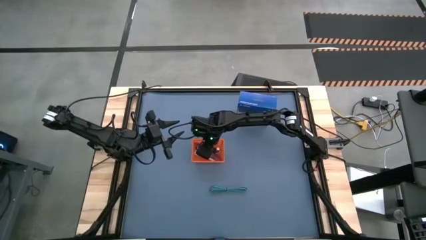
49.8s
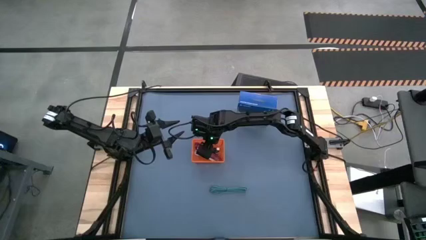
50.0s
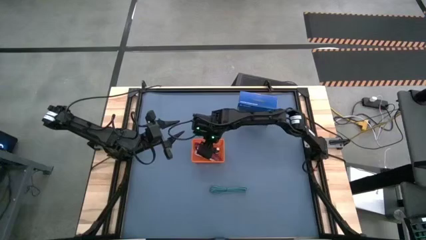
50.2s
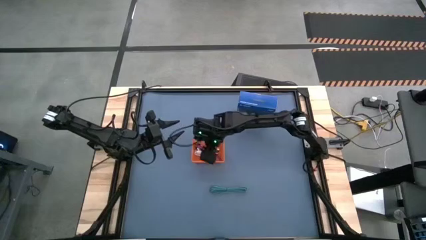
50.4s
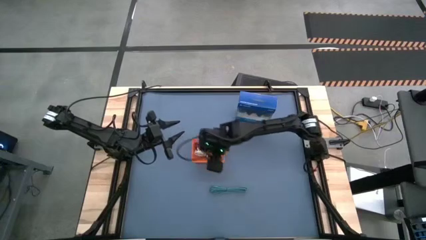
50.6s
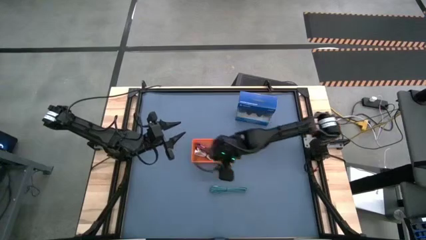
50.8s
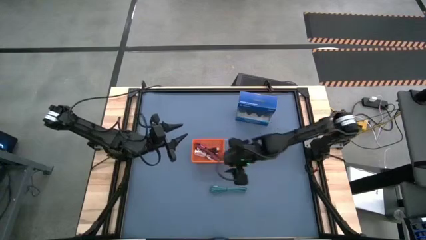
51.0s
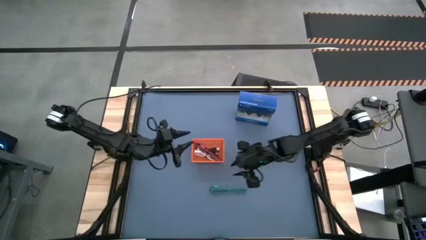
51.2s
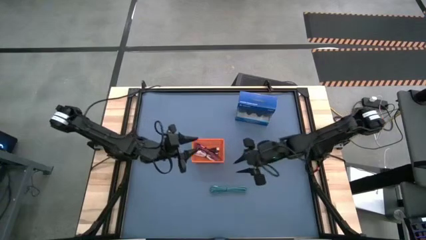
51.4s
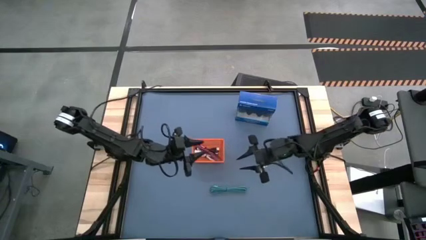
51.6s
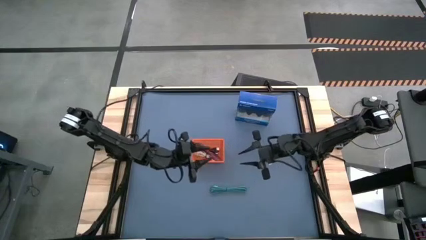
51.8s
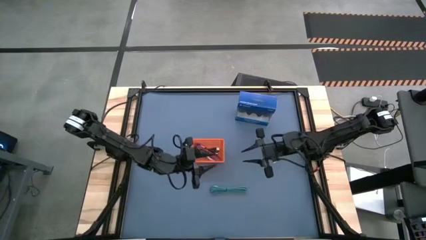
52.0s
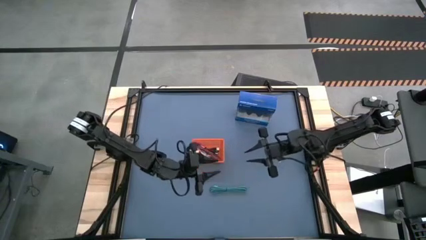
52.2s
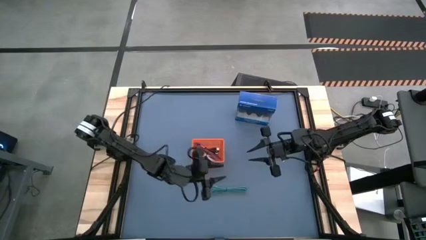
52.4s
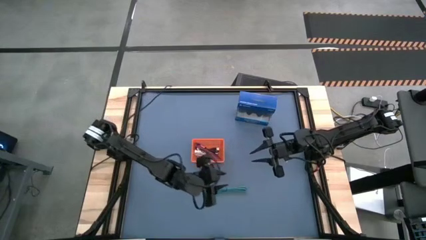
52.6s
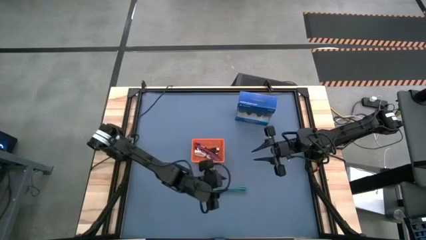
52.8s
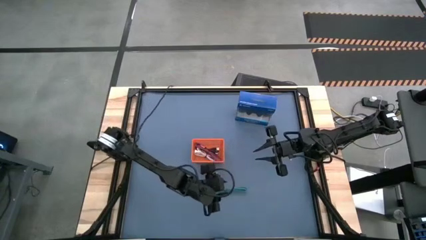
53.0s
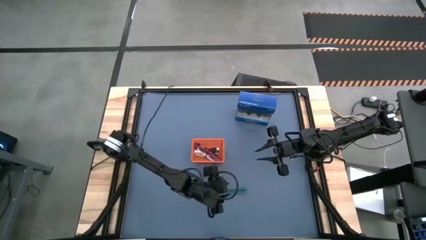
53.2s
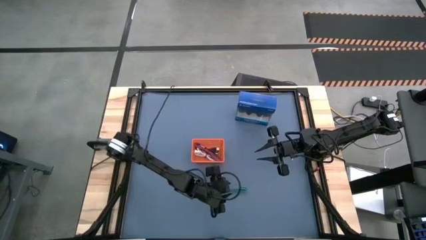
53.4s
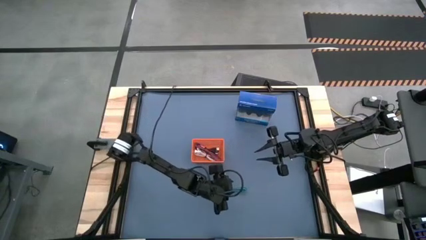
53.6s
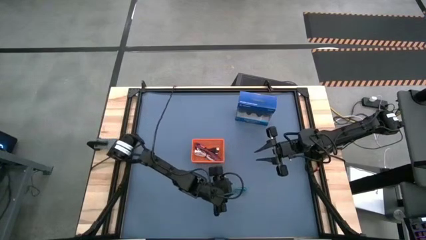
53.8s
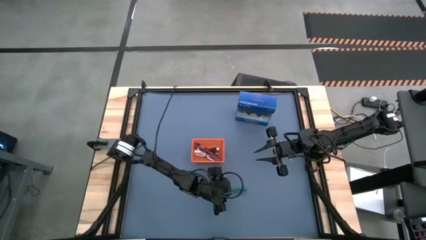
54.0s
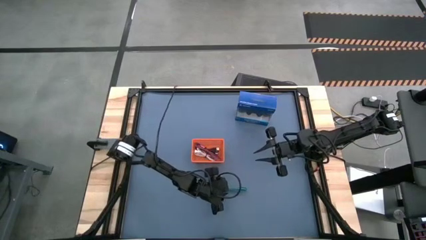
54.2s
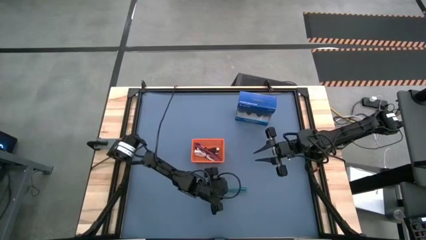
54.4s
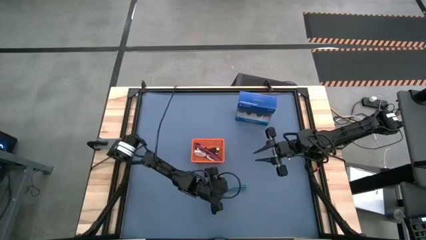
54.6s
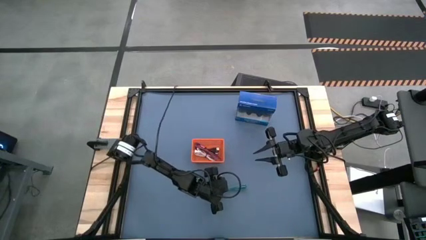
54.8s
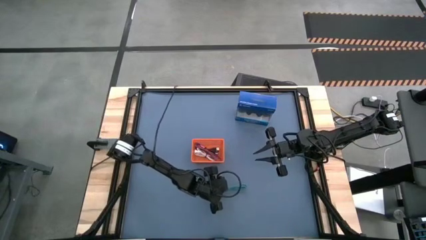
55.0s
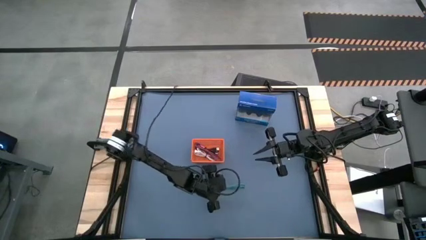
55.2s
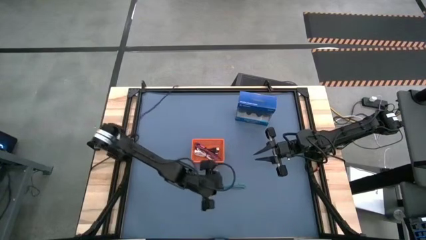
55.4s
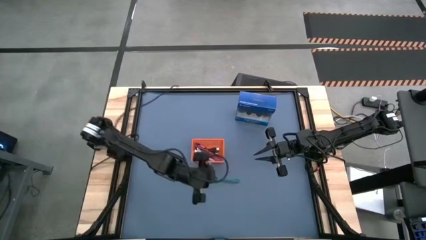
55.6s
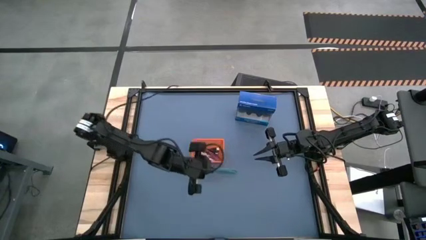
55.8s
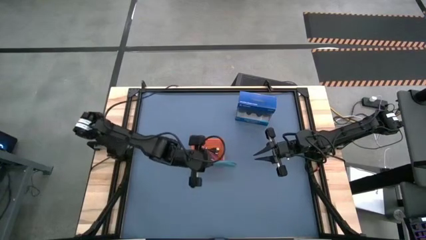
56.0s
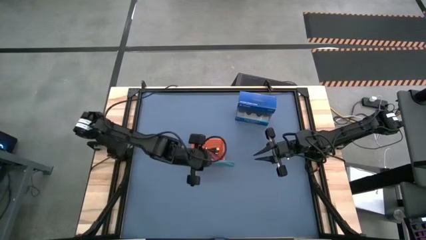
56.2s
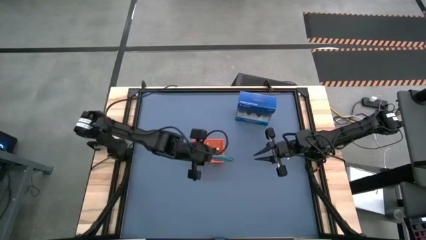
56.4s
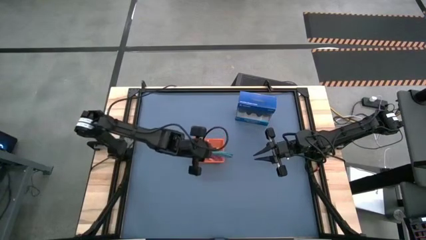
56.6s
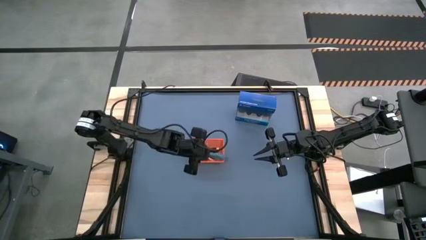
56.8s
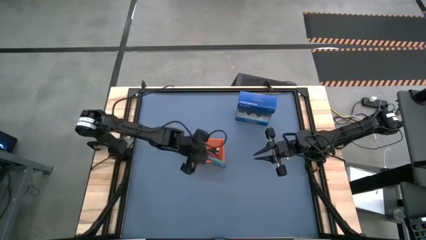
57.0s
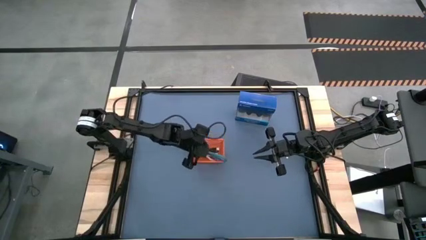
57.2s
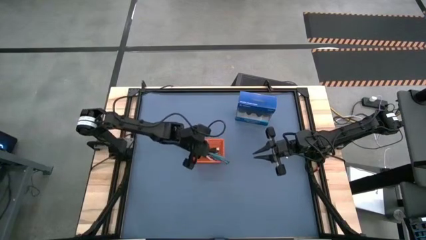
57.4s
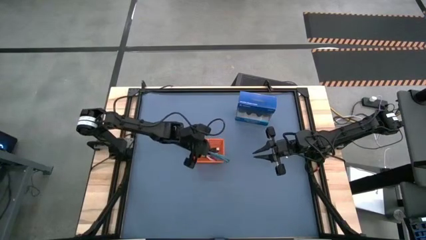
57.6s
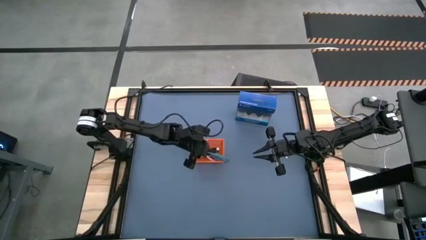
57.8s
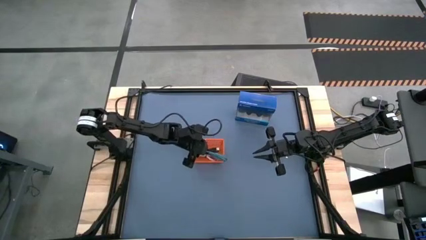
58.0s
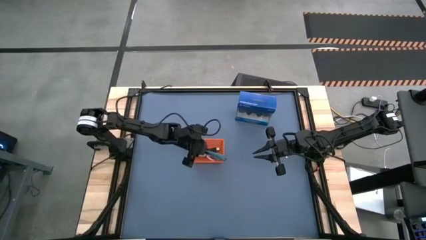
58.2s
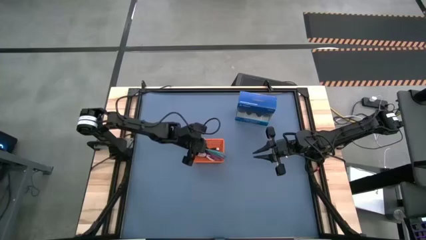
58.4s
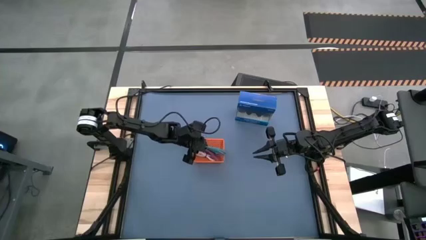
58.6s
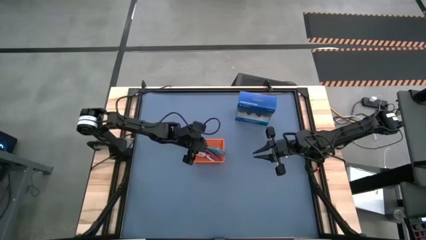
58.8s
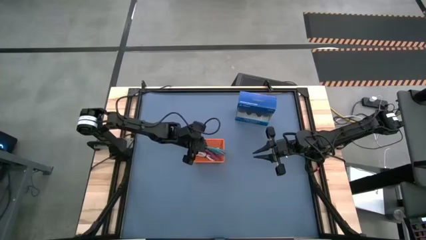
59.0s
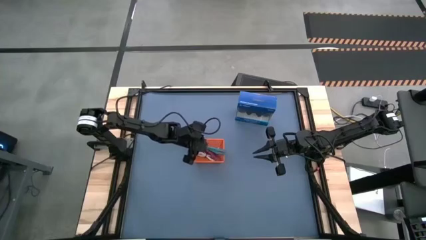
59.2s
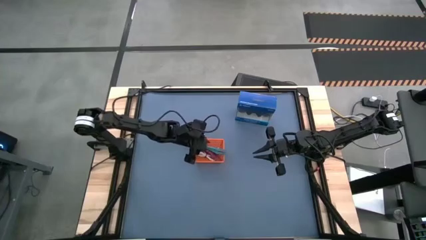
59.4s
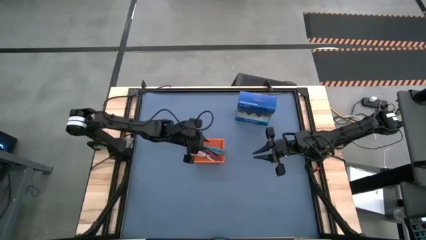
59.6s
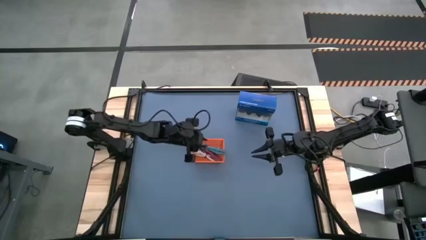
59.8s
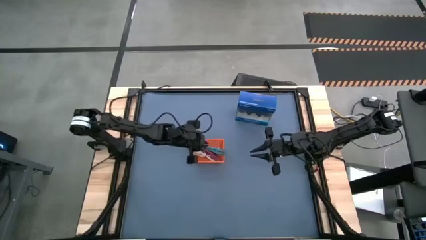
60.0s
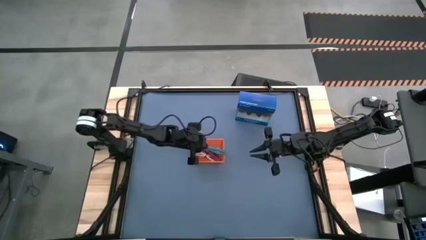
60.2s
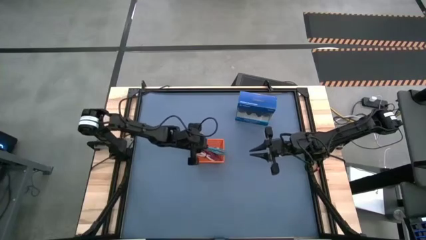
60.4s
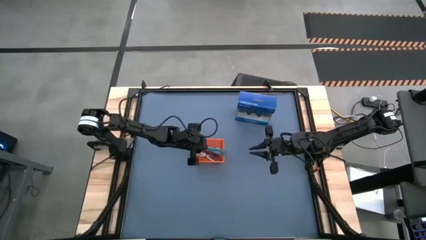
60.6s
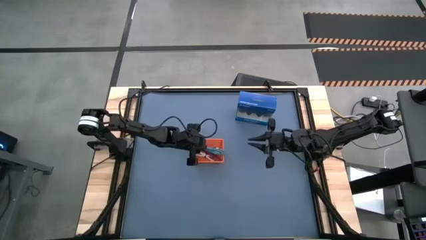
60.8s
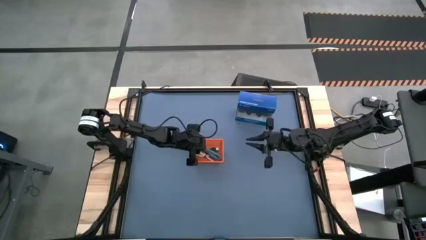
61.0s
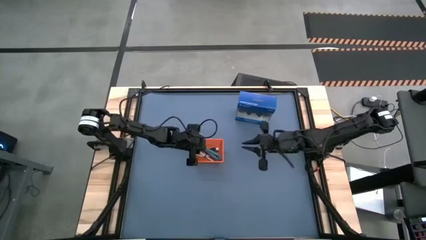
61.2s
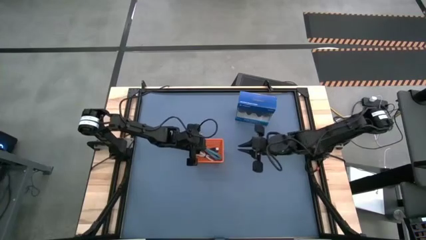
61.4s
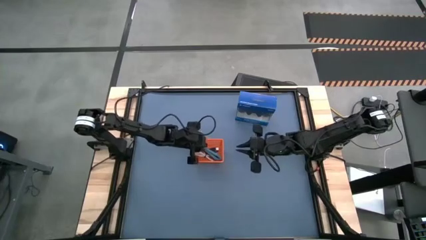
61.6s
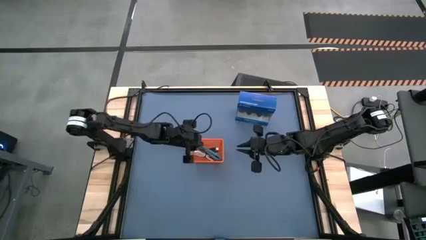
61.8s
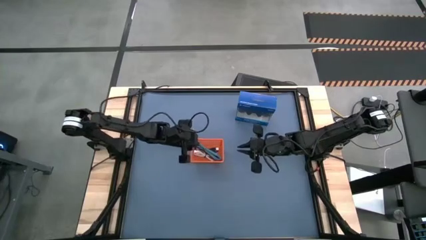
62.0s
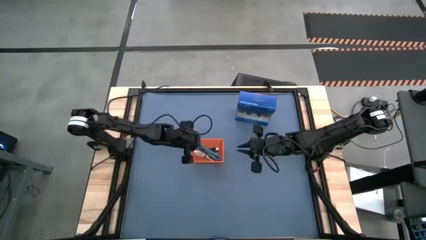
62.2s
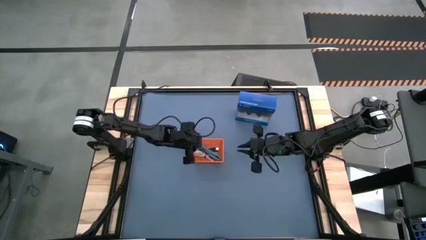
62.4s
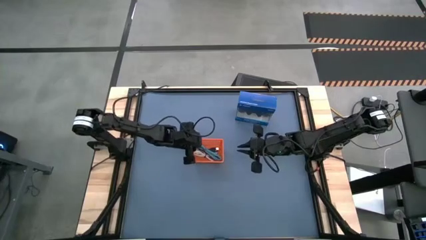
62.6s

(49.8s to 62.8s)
Task: Pick and place USB-C Cables
Put the blue charger cable into the orange bin

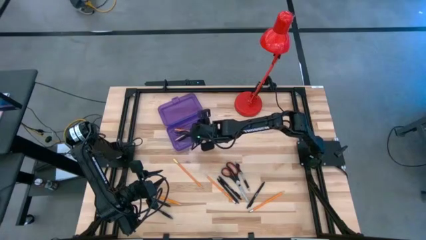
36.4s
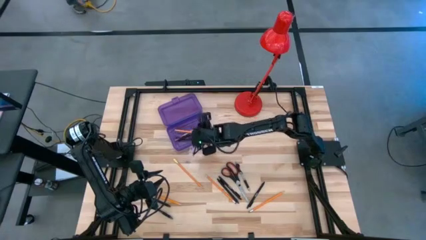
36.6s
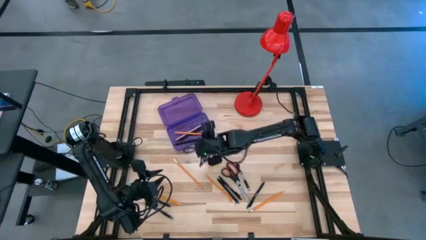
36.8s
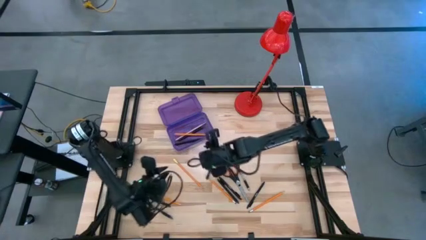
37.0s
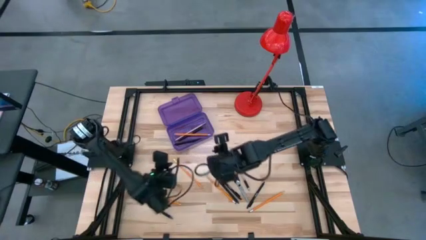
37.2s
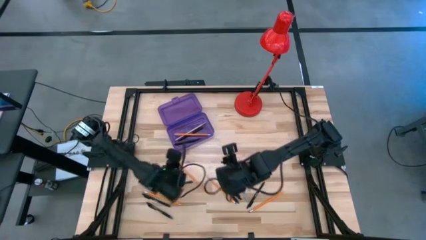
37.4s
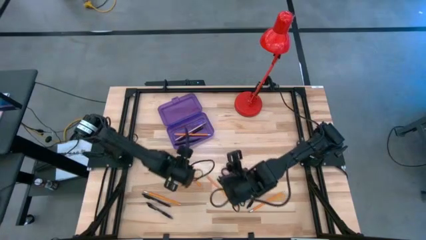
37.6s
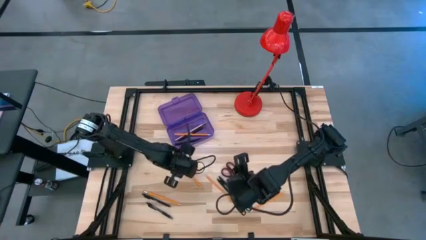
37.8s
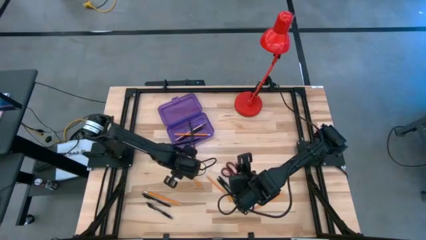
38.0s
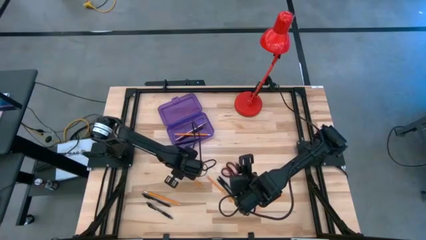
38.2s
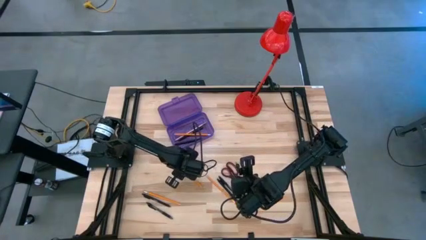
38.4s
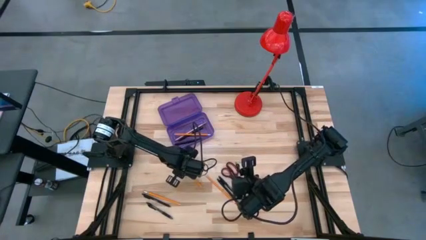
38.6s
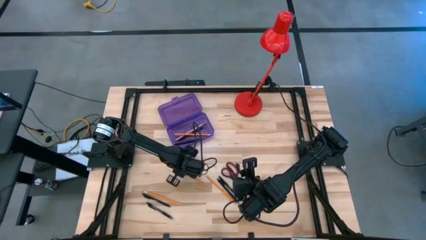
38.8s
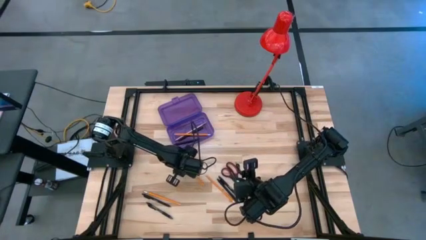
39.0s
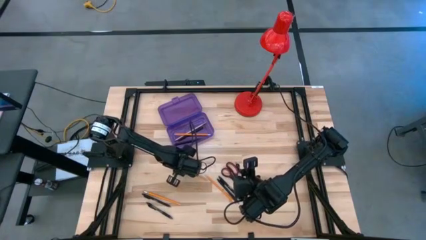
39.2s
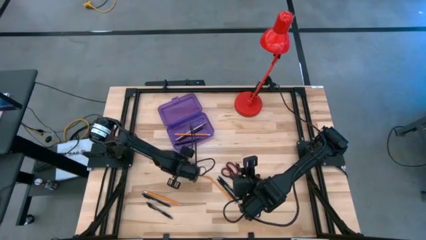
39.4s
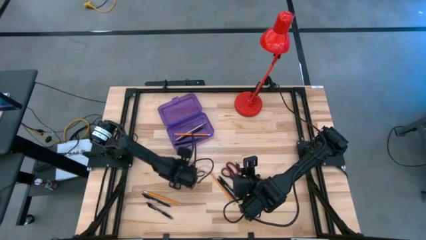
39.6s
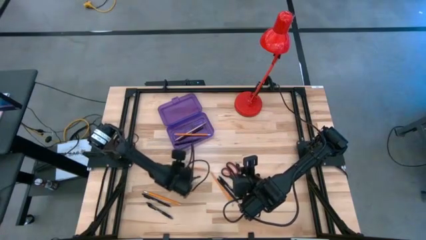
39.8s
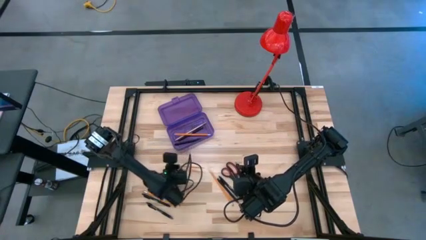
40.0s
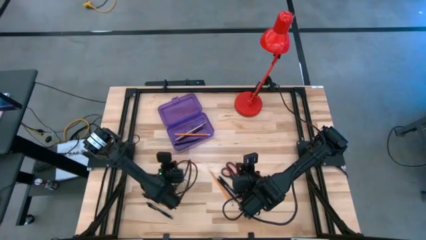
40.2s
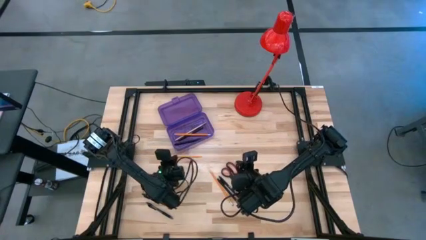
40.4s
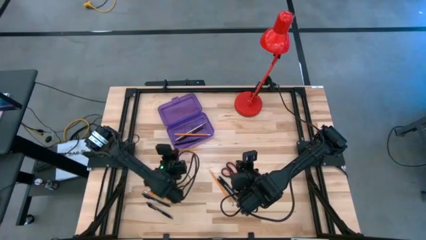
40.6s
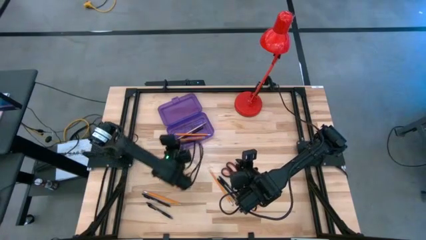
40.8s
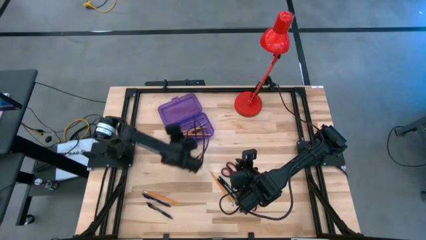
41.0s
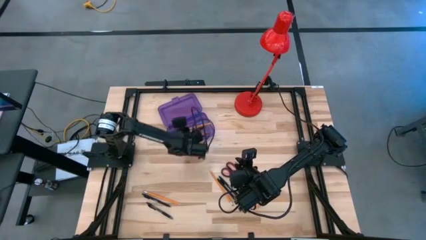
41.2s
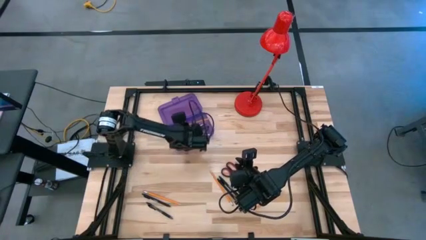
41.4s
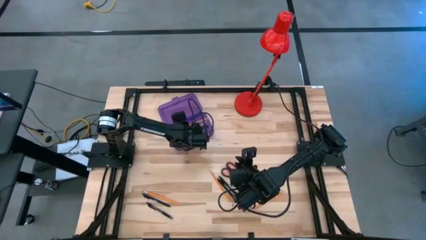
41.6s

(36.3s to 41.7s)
Task: Pick & place school supplies into a supply box
Put the yellow pencil into the purple supply box
